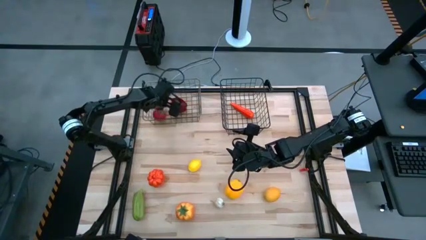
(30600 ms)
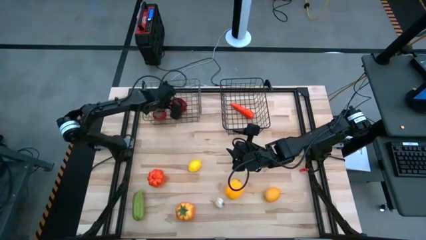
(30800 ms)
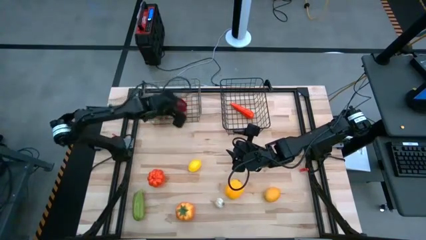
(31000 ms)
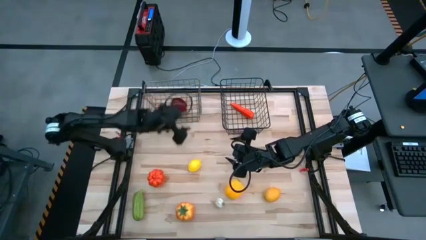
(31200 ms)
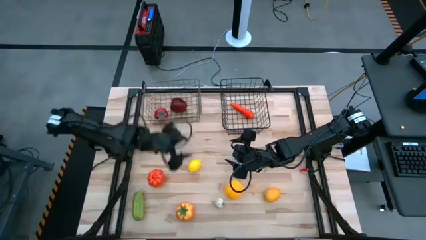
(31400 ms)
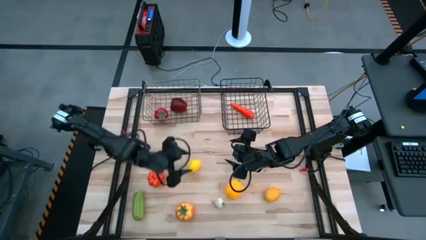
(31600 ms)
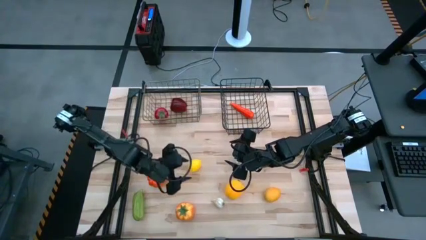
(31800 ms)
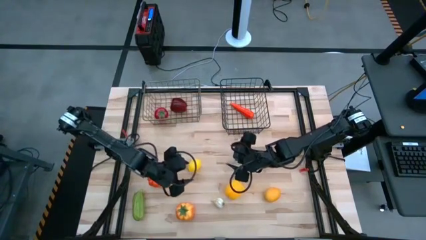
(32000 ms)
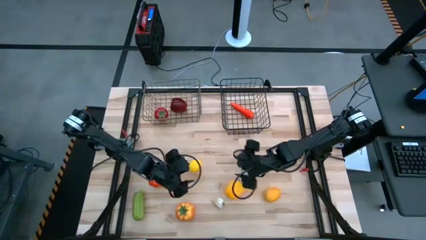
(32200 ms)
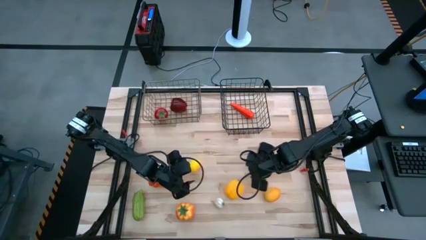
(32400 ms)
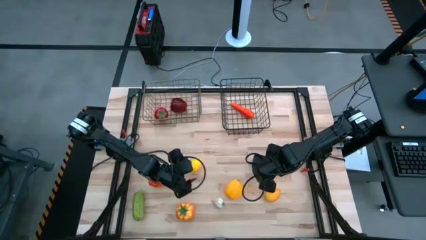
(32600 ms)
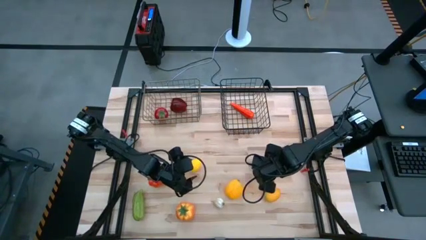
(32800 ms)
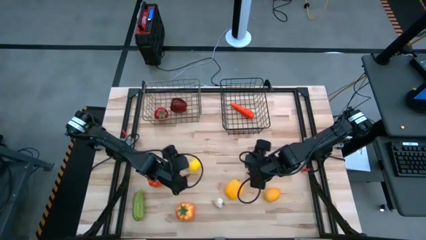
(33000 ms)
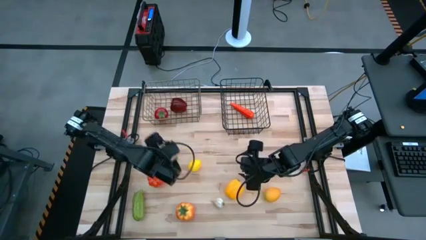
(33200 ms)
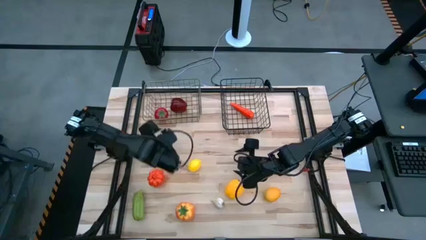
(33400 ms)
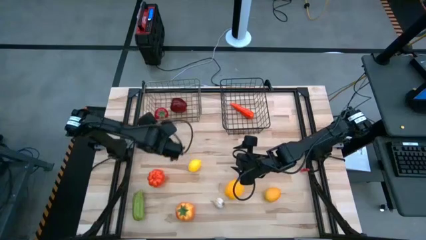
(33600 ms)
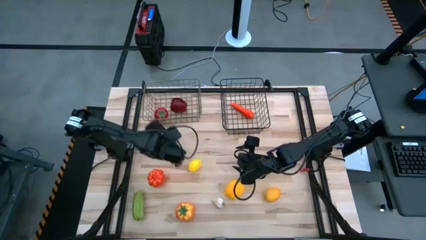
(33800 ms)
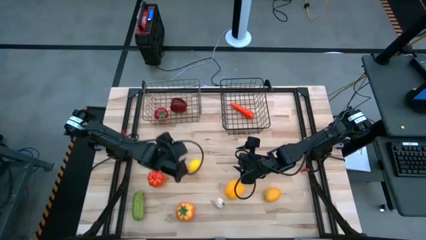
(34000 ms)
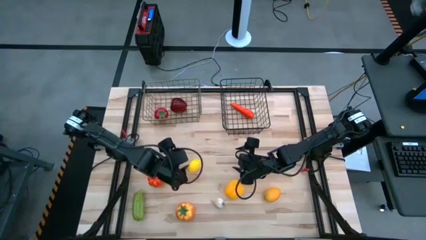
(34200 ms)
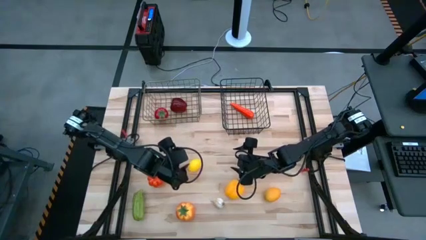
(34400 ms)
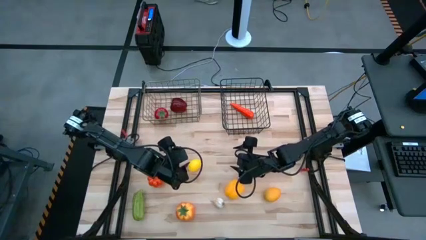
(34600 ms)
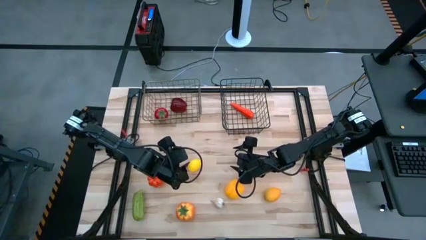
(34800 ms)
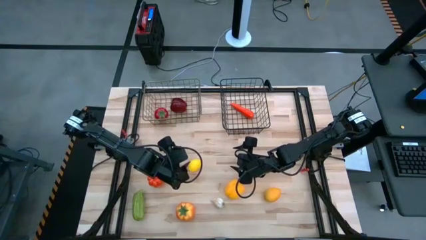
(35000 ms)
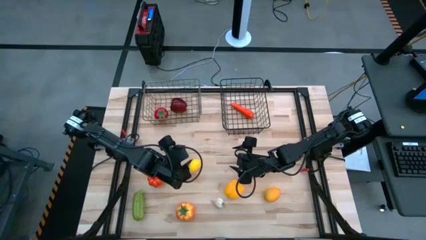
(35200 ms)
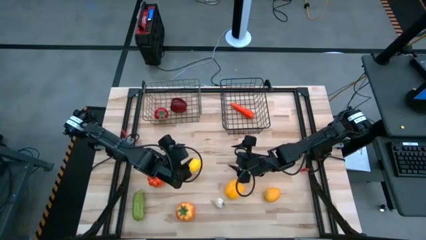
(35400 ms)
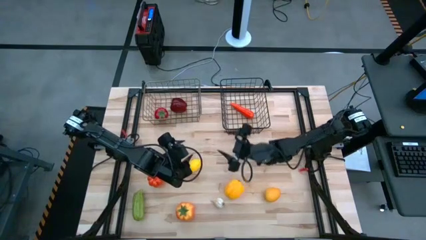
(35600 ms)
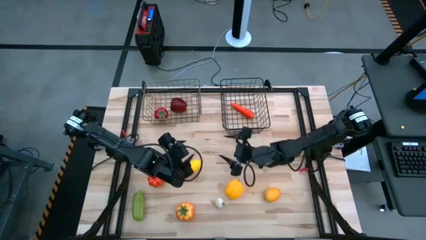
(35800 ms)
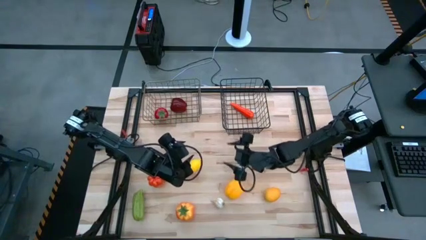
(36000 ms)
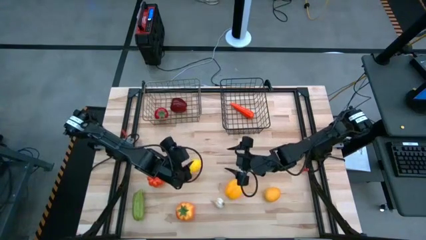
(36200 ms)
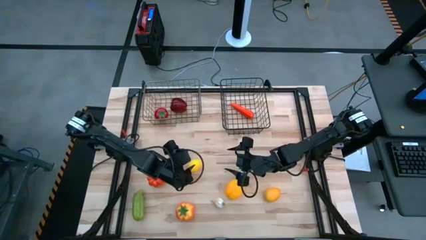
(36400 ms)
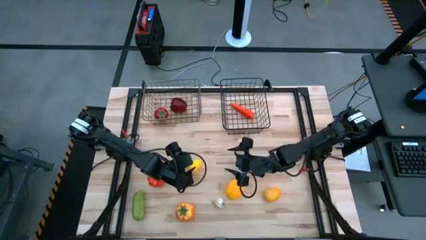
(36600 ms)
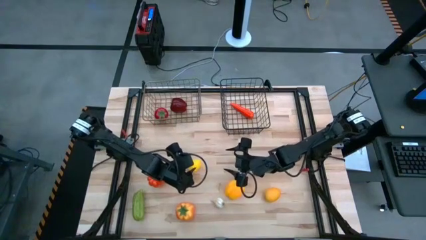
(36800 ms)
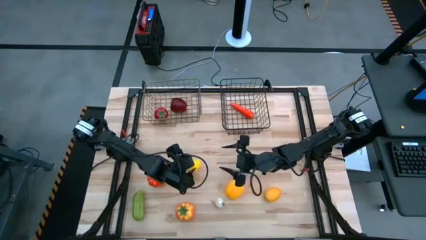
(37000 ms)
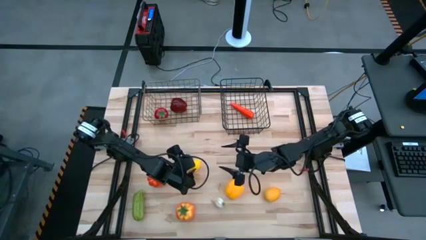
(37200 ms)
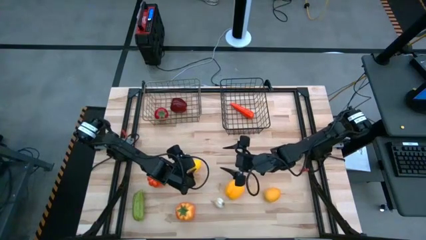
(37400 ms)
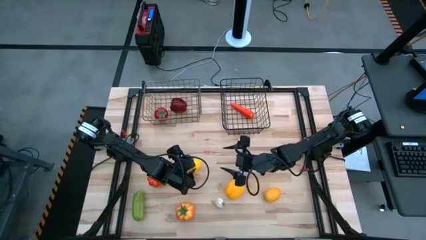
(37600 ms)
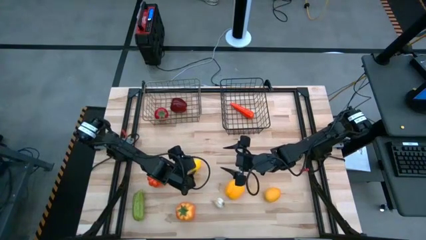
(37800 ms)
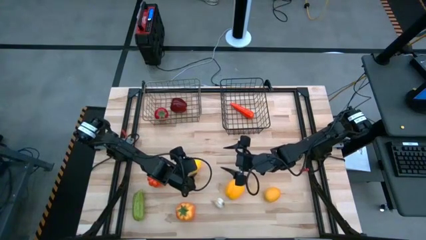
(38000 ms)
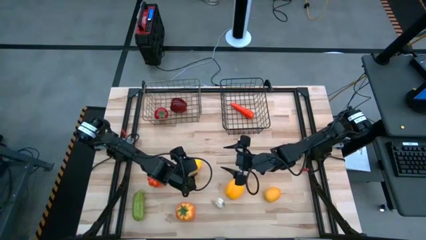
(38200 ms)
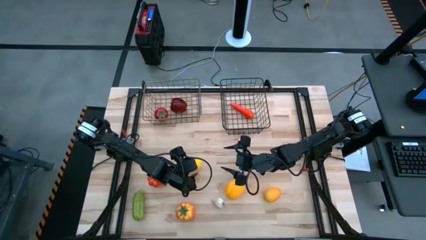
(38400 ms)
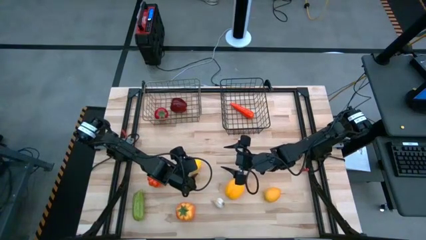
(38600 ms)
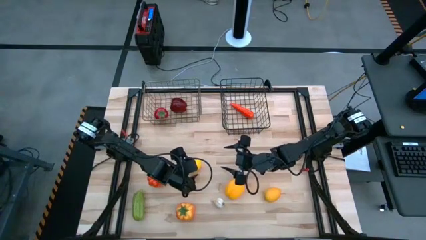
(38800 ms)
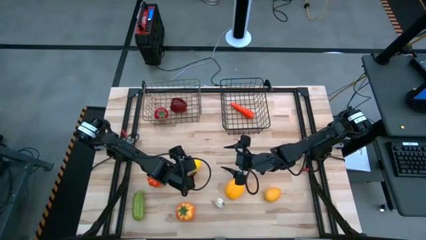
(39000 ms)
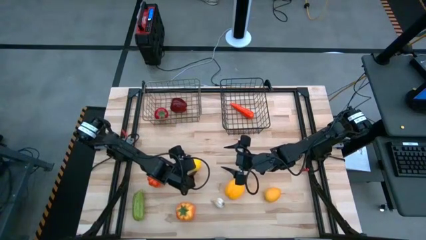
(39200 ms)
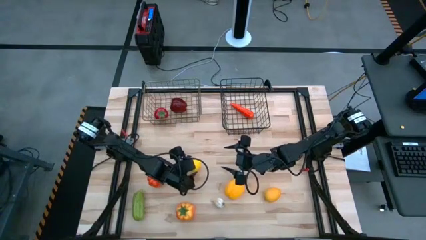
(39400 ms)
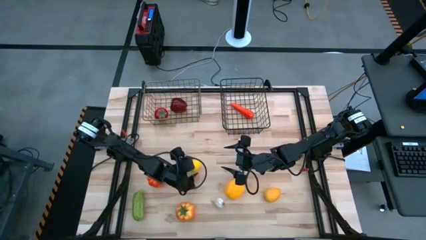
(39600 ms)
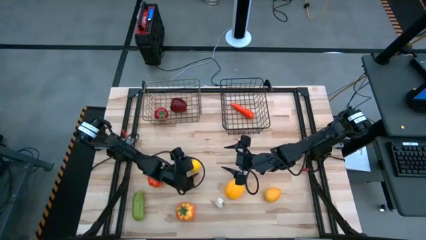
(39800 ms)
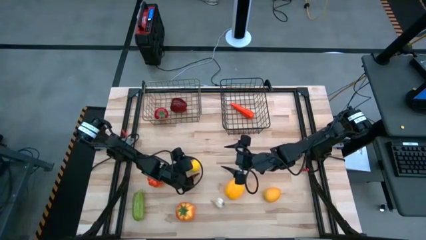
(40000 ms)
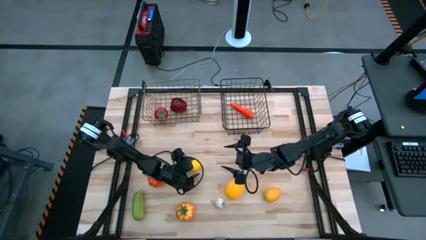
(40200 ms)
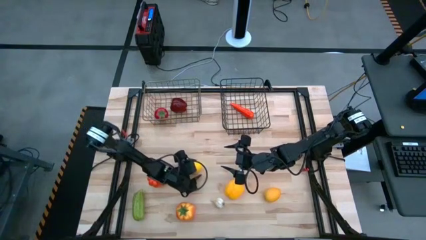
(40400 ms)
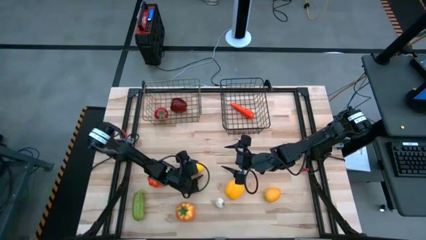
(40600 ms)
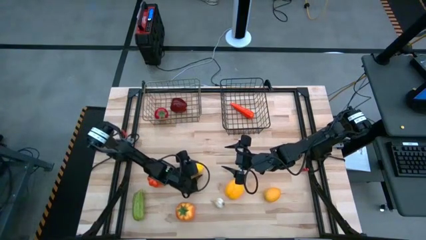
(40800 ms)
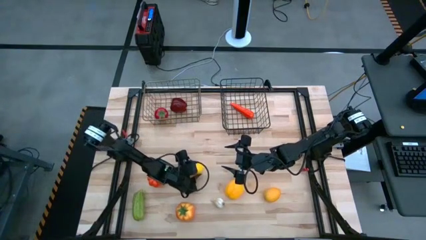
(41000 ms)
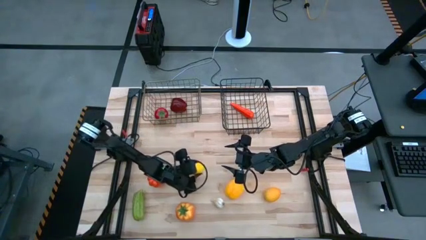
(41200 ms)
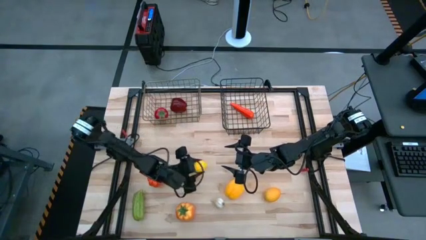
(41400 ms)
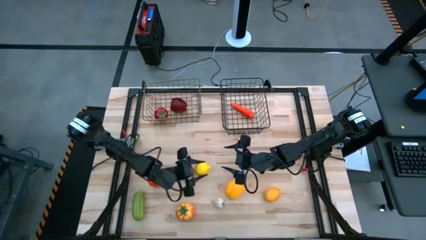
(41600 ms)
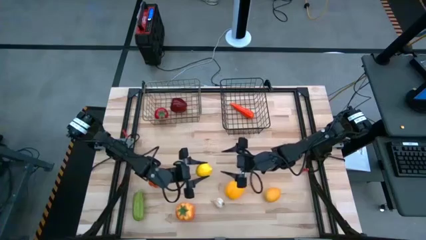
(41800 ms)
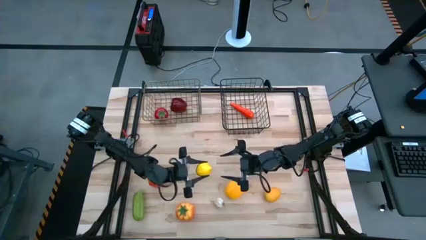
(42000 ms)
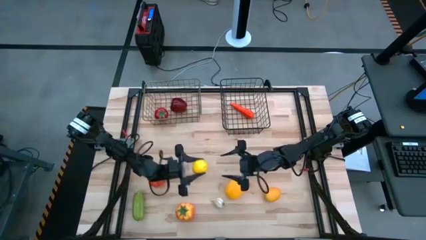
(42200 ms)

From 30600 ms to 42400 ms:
Task: Sort produce into baskets
Put the lemon into the gold wire basket

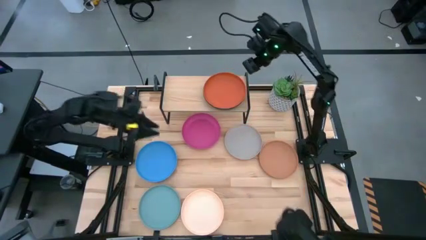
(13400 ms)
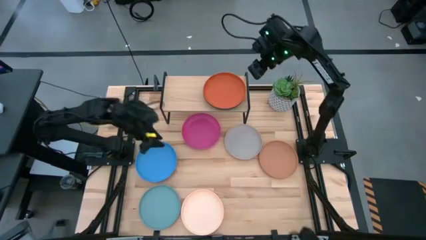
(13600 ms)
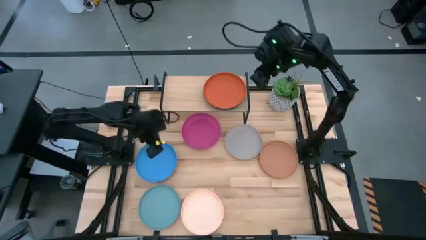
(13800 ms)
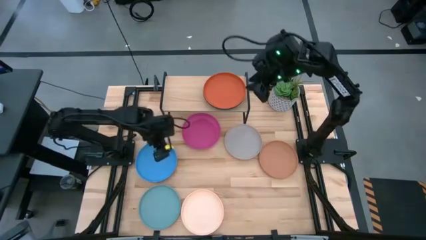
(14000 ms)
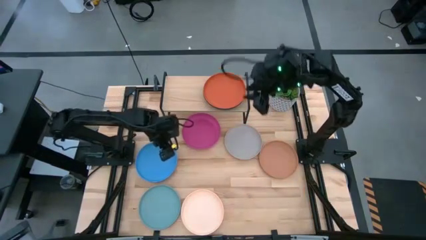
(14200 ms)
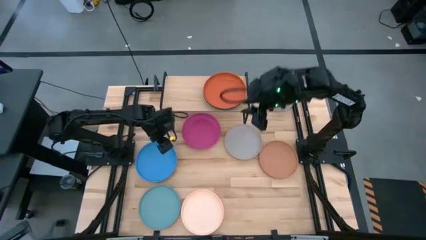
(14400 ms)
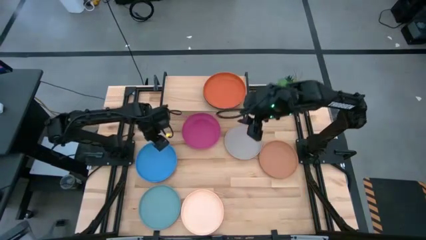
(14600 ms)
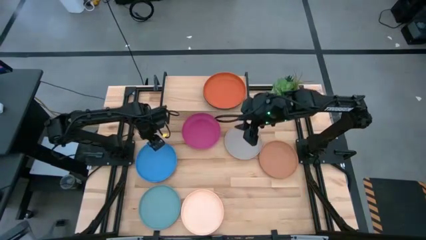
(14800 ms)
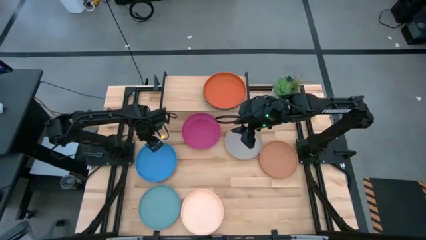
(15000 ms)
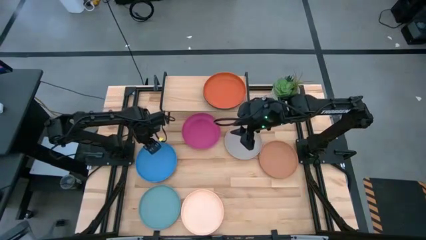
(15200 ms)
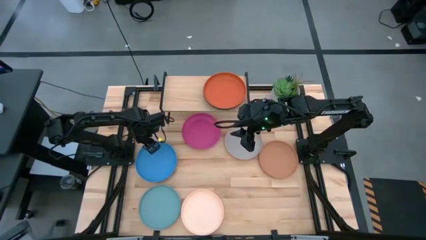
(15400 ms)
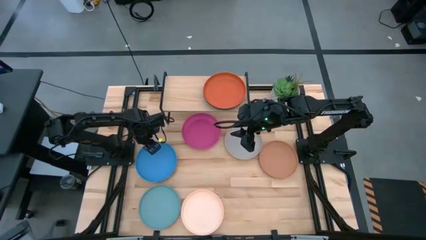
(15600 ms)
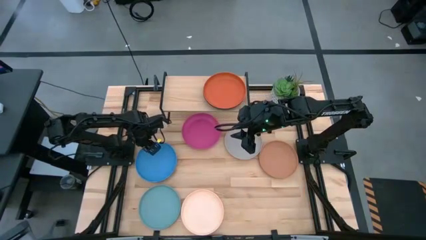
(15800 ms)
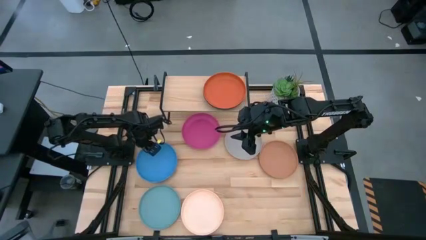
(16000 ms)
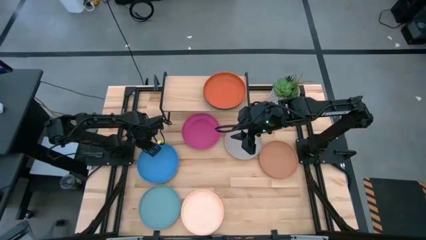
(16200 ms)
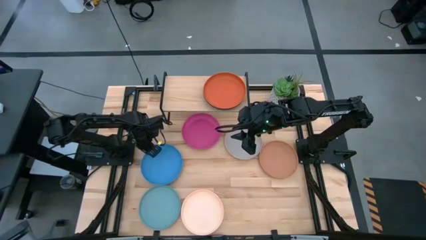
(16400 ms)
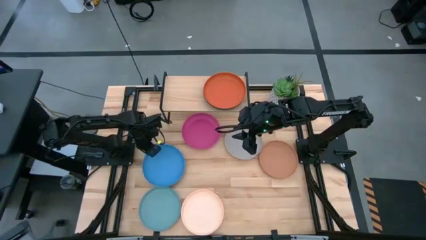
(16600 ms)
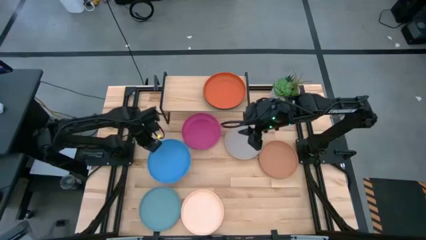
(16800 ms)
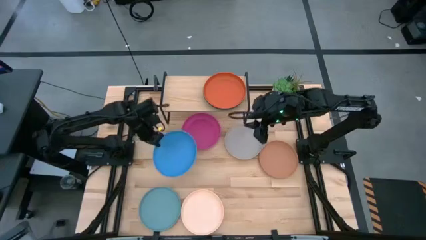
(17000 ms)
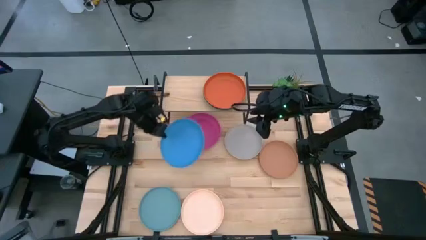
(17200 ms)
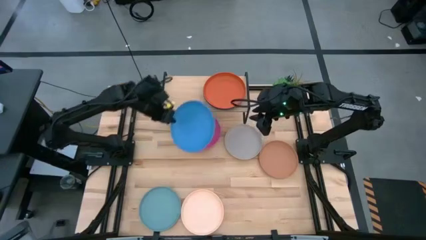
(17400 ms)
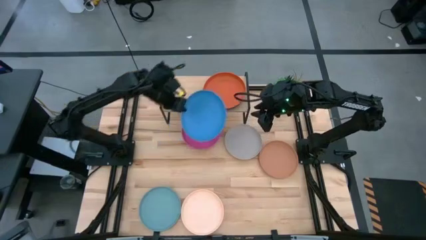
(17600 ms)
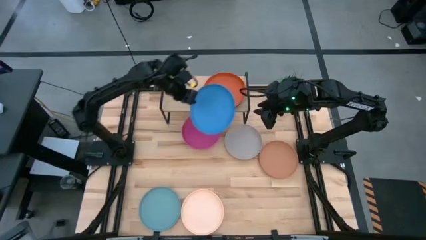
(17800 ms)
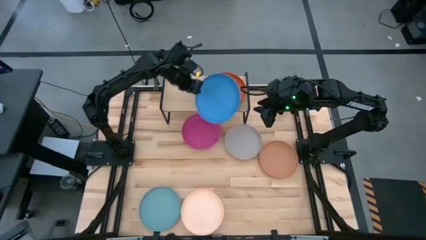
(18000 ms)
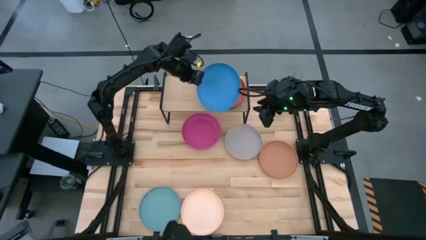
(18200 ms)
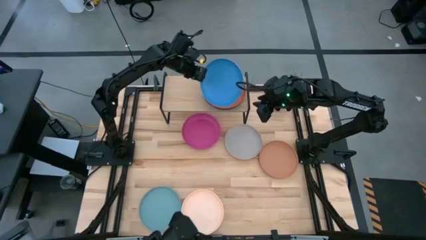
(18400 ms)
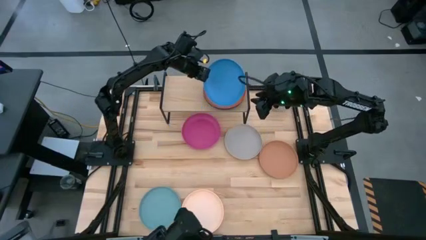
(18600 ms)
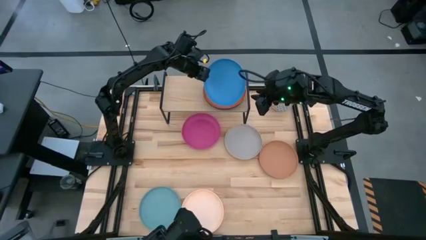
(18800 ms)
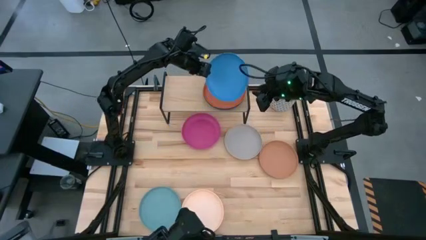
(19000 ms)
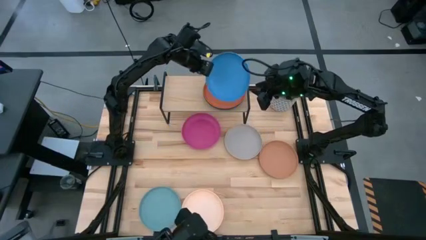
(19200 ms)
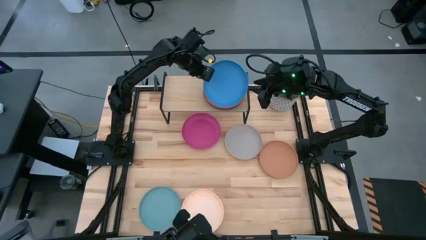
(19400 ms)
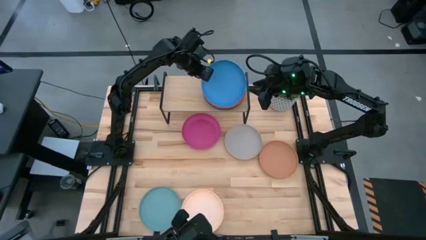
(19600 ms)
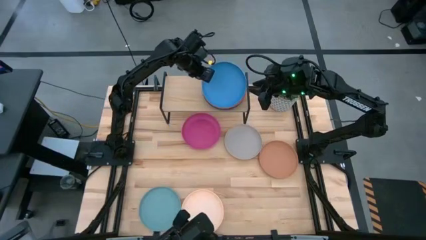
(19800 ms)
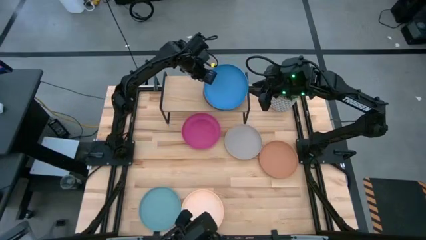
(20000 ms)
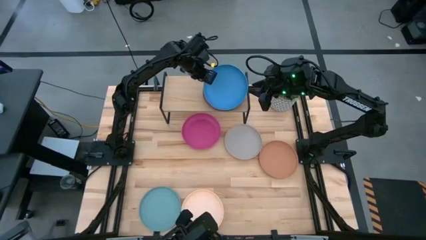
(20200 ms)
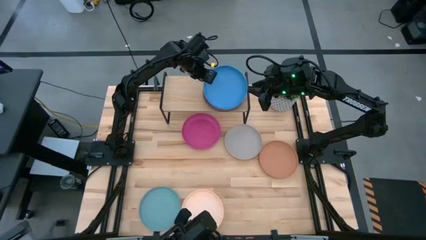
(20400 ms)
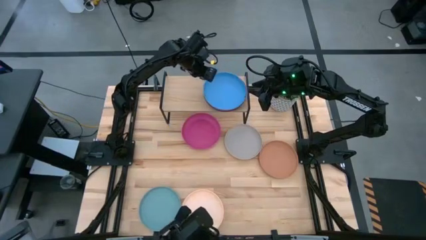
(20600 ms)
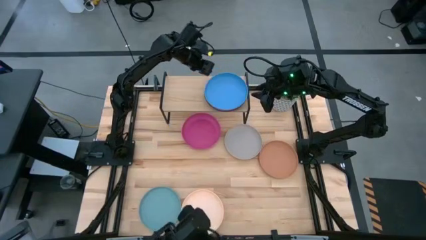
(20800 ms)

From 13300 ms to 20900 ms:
Task: Place and stack plates onto a shelf
Stack the light blue plate on the orange plate on the shelf
